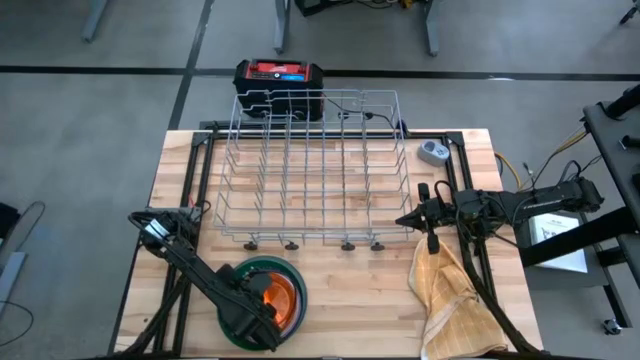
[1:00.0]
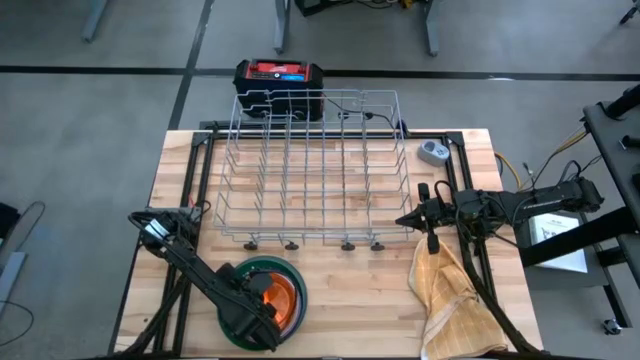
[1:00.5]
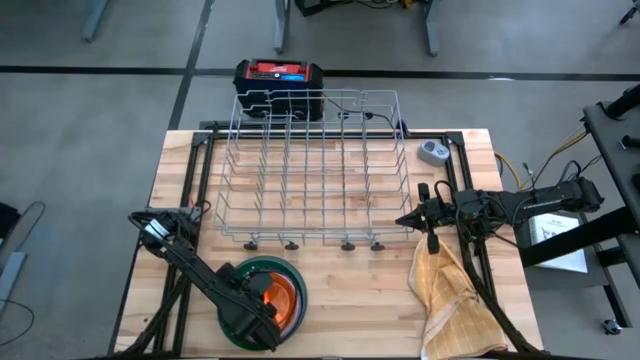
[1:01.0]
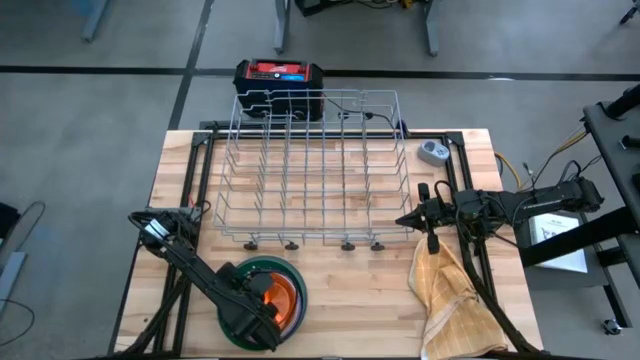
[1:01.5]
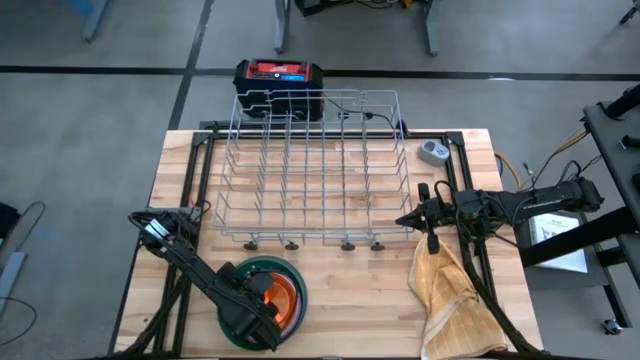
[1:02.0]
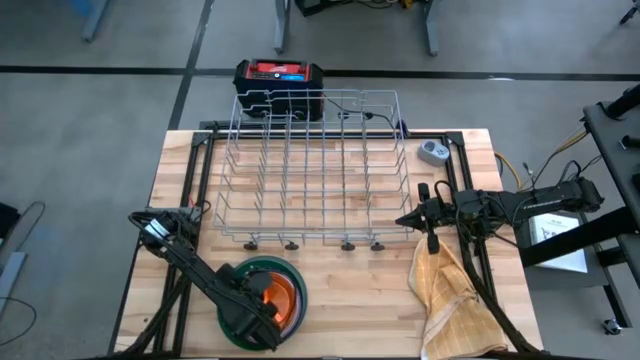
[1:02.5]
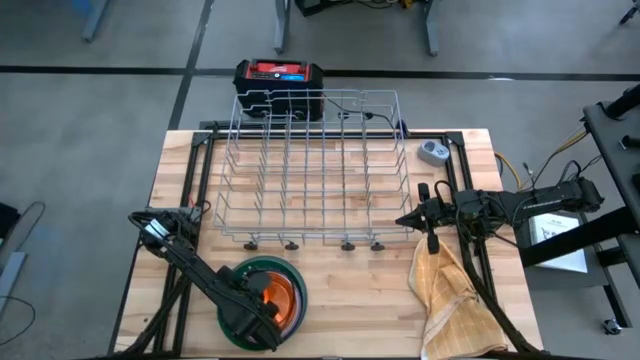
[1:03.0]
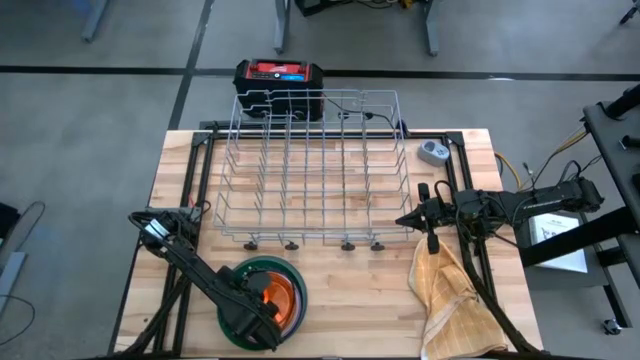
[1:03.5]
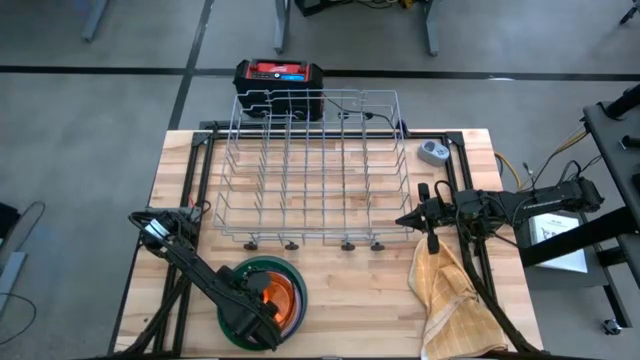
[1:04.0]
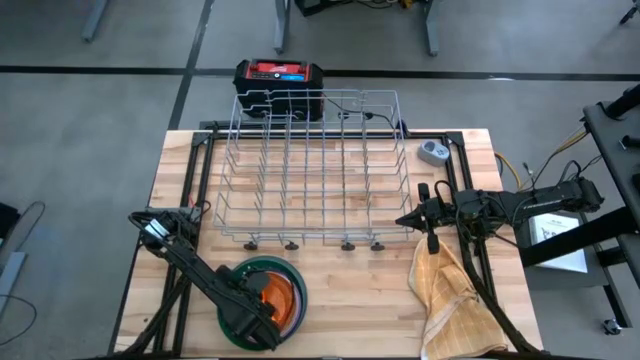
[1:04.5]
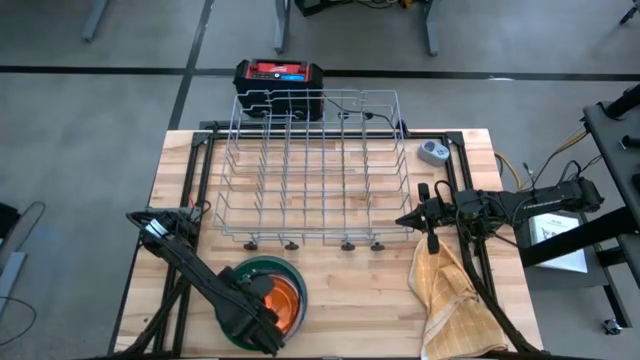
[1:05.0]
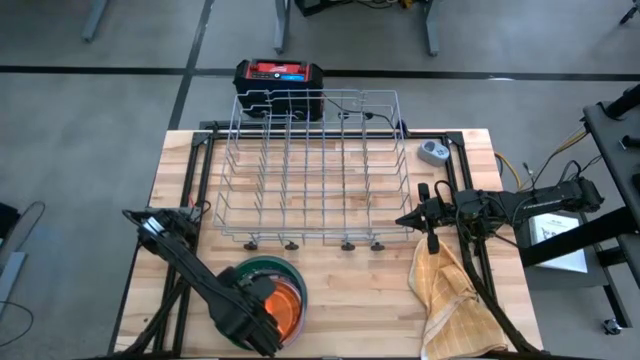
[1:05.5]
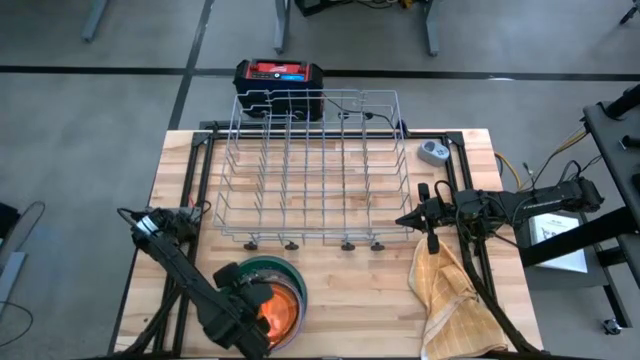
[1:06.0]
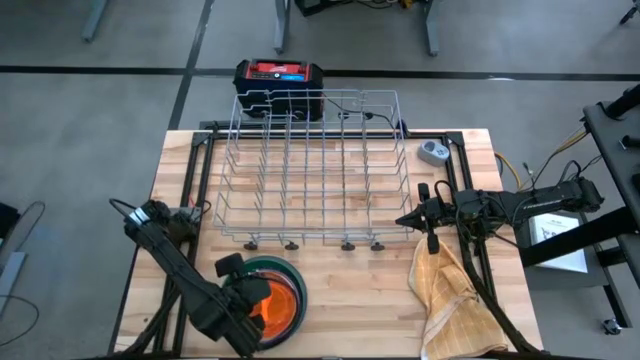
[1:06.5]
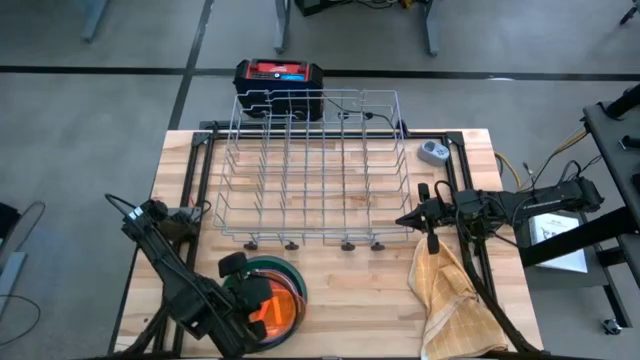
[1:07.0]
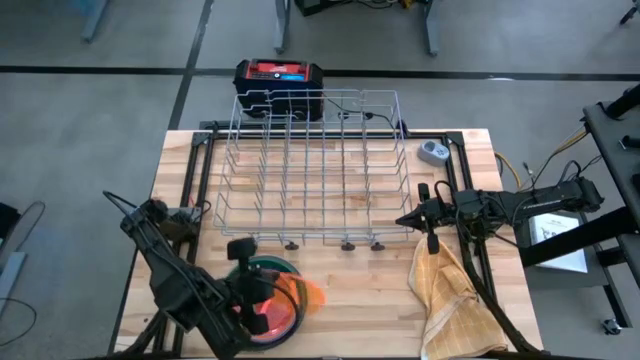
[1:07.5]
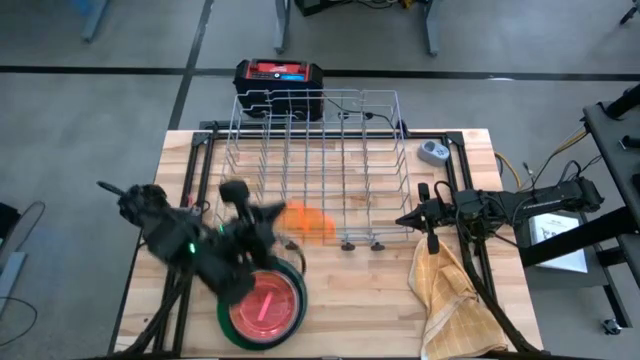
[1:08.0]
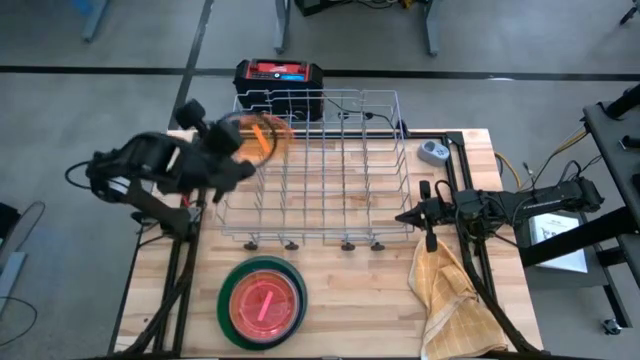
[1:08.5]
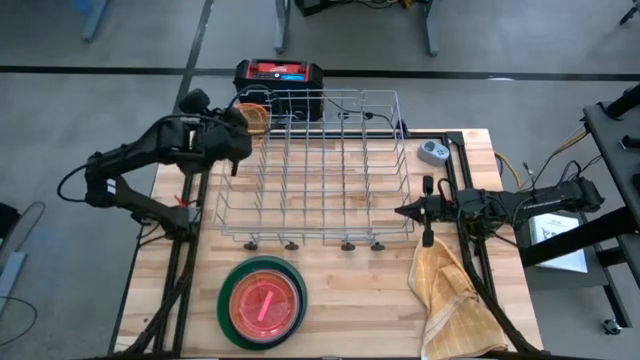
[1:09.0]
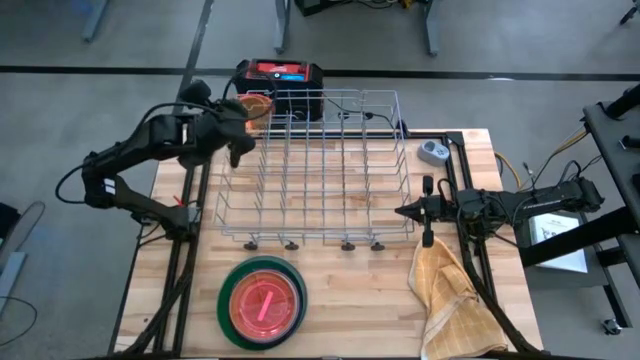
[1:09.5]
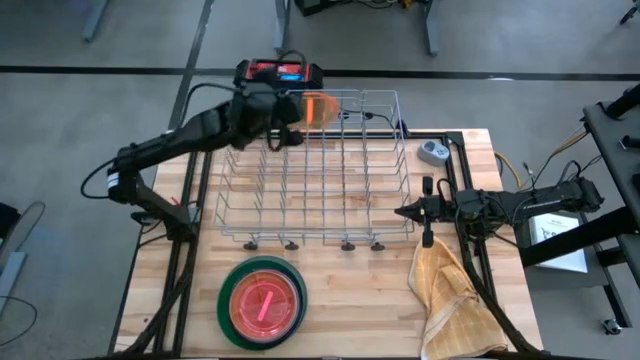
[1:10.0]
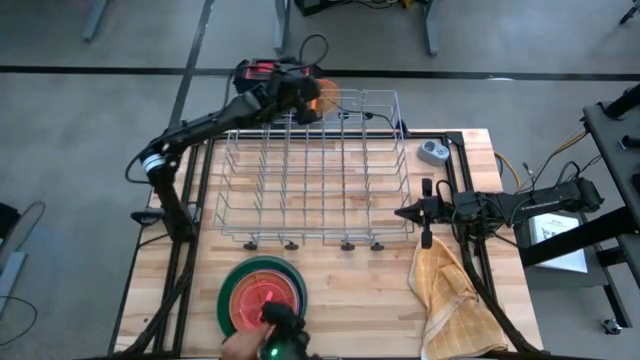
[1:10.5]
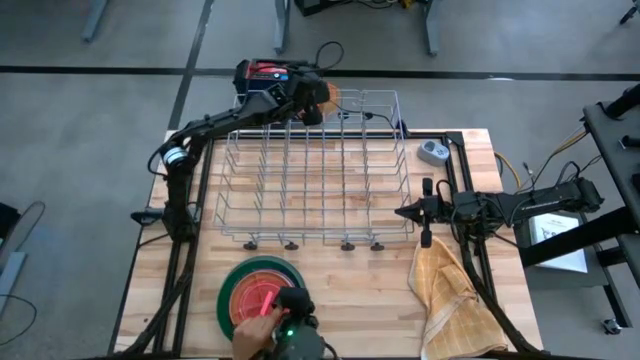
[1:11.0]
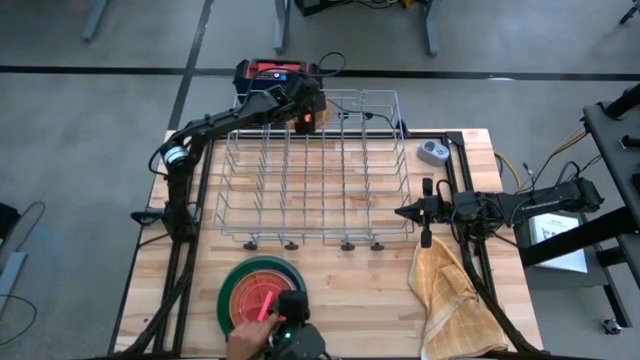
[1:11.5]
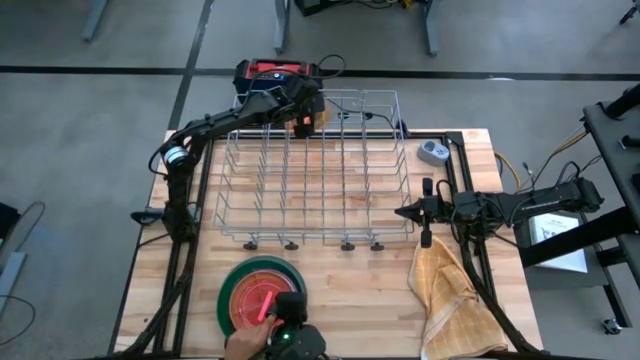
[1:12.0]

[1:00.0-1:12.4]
Task: Sort dishes
Put the transparent orange plate into the dish rack

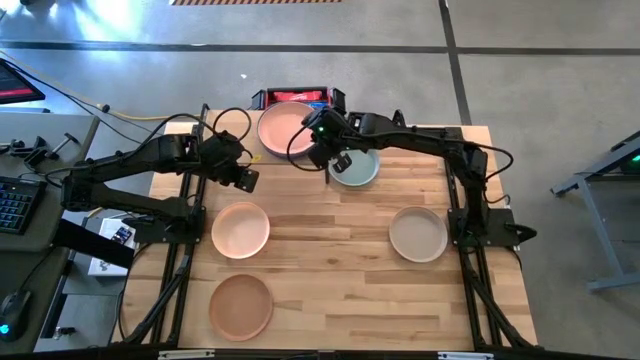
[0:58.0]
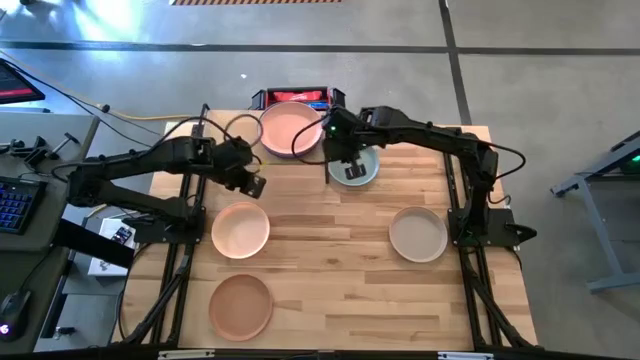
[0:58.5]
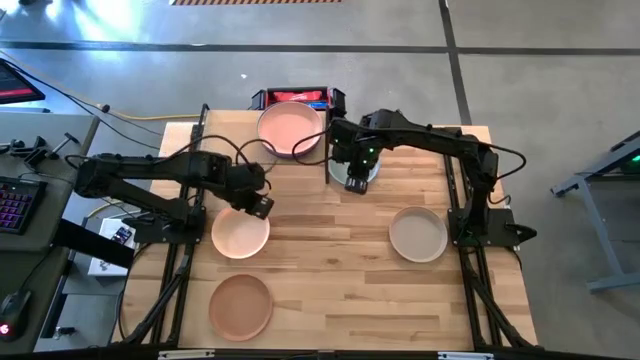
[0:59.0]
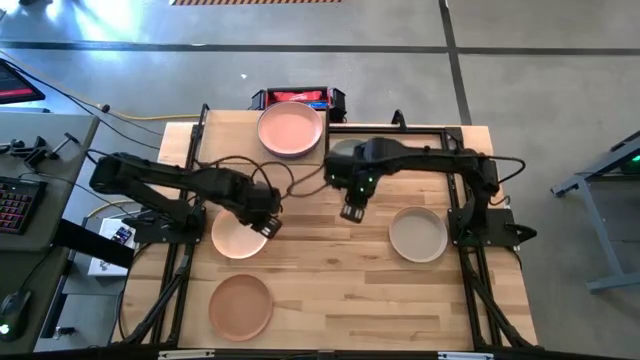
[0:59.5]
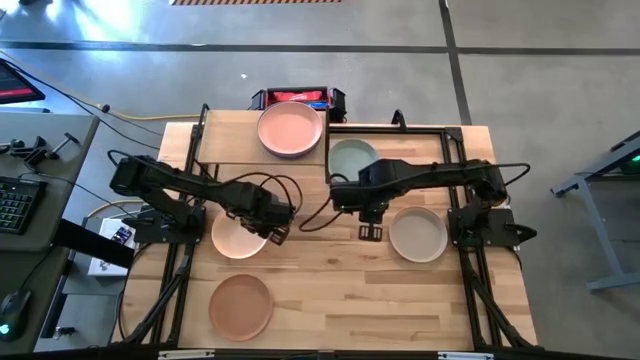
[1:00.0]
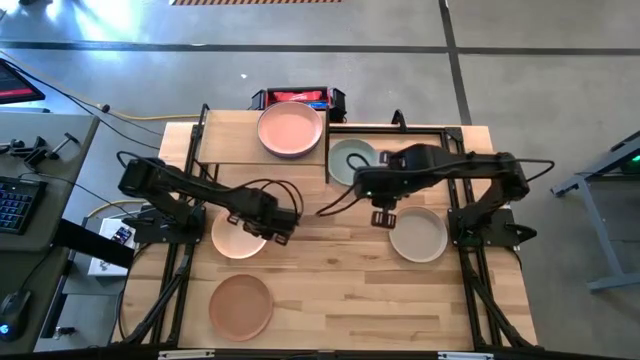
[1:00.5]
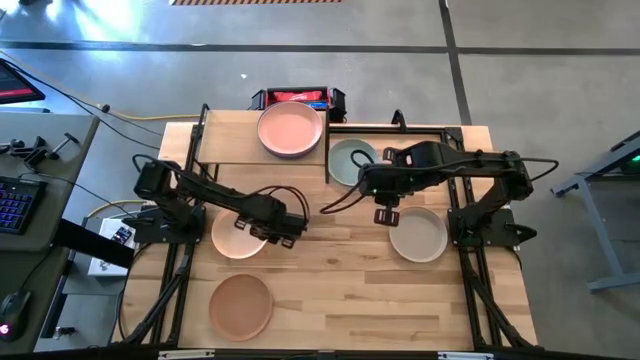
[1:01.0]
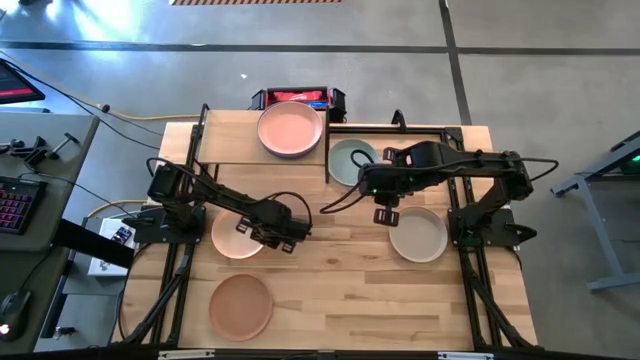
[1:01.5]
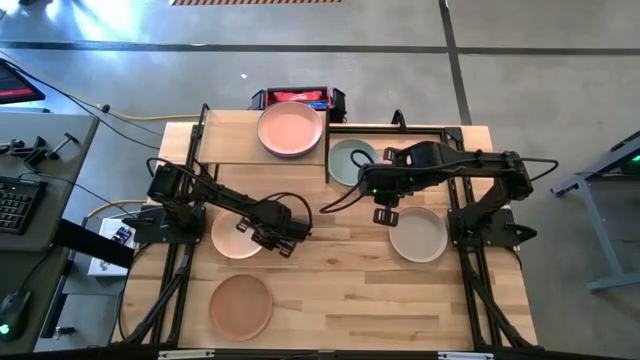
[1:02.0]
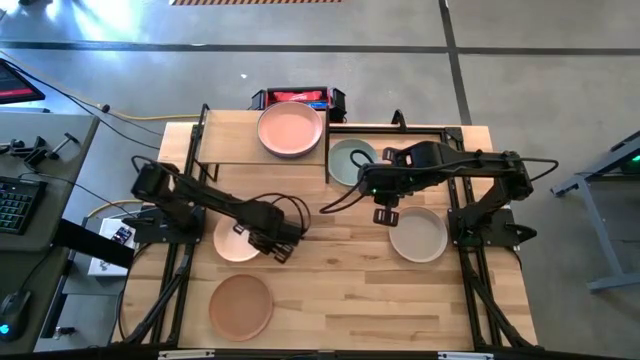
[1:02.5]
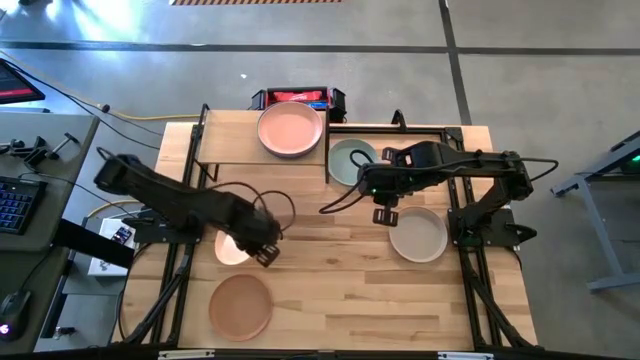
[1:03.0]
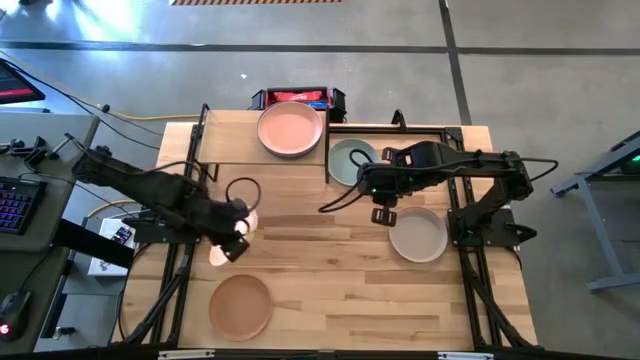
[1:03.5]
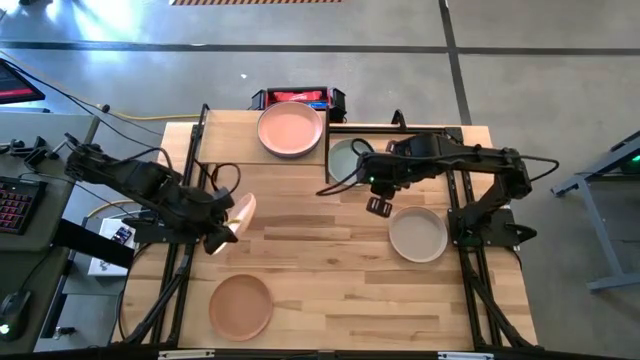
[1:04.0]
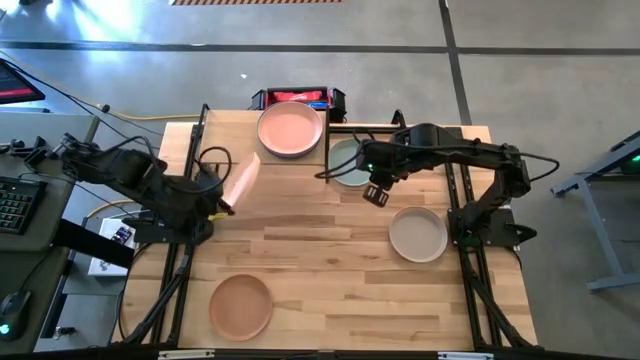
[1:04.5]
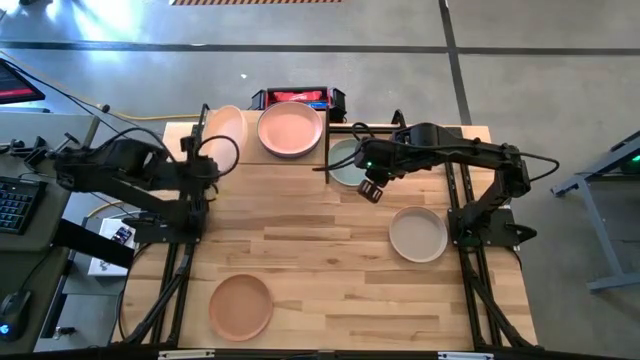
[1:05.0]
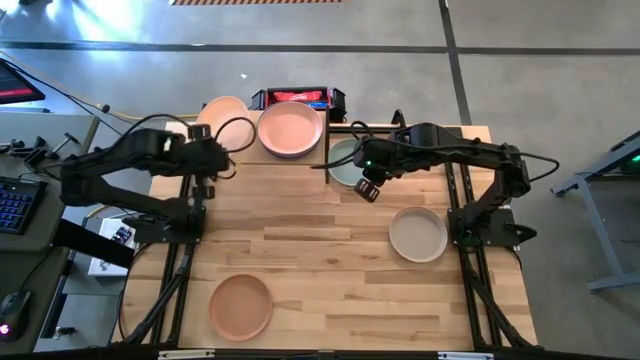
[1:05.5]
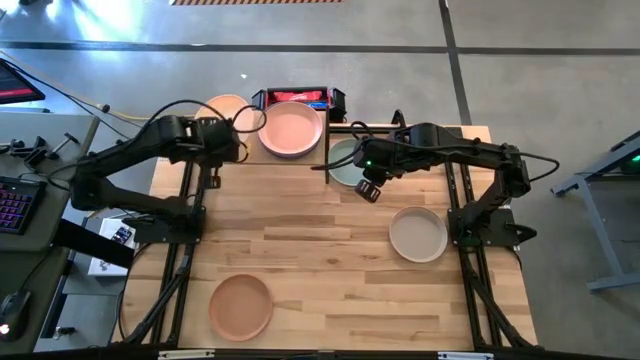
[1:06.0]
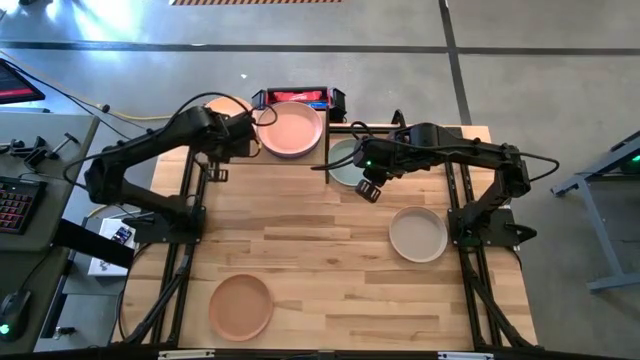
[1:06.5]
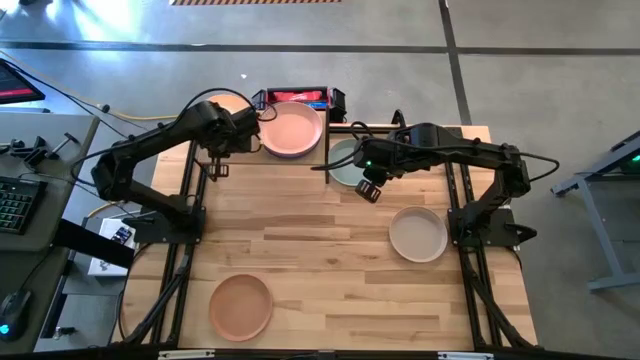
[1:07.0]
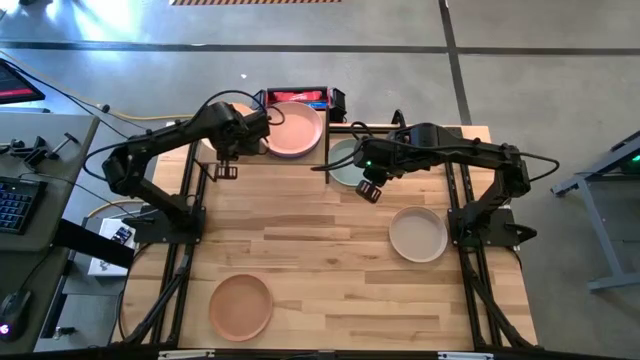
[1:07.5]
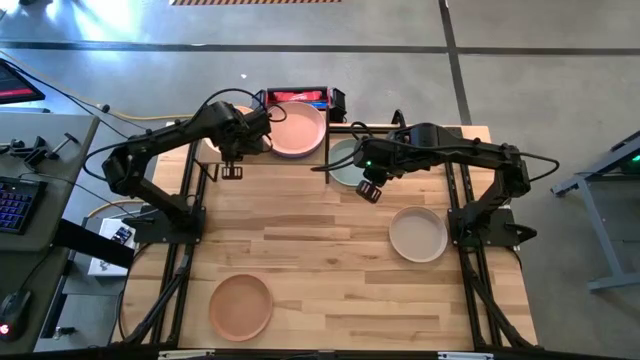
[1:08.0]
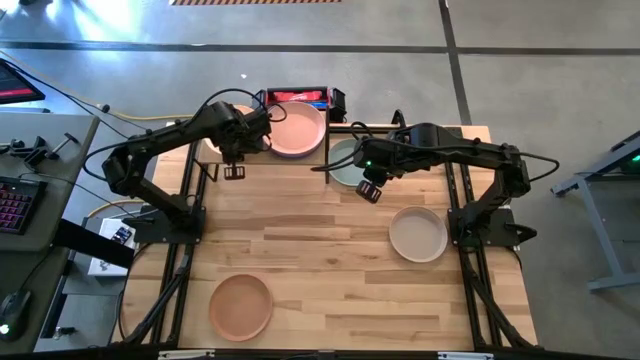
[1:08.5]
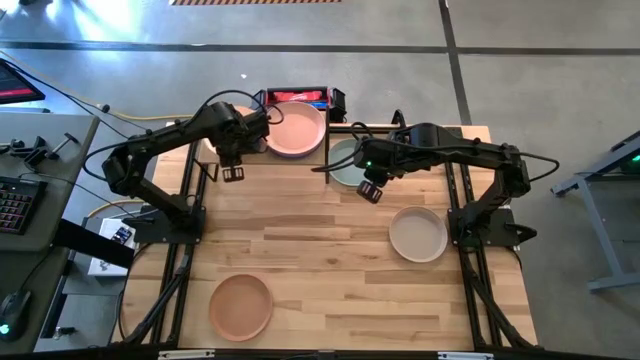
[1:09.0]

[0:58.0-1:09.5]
Task: Place and stack plates onto a shelf
Put the white plate on the shelf
